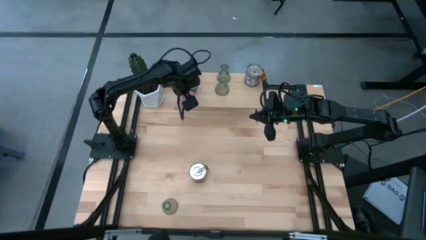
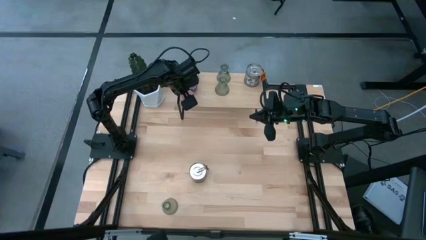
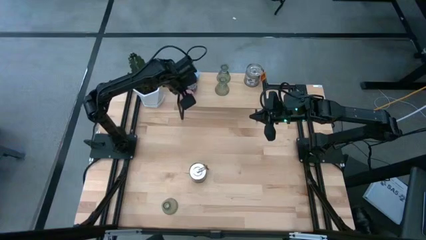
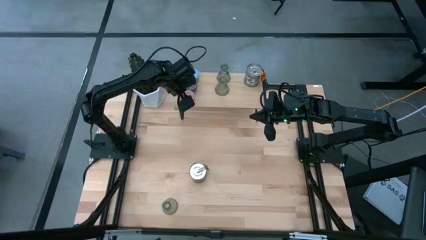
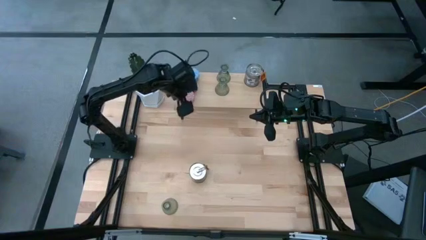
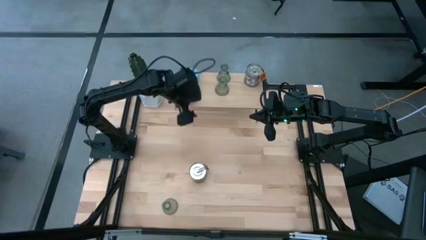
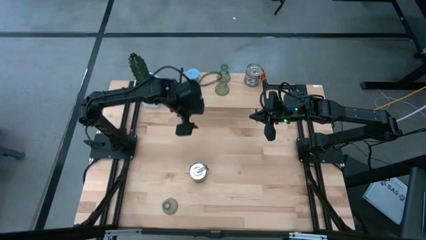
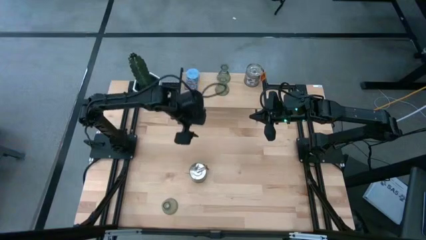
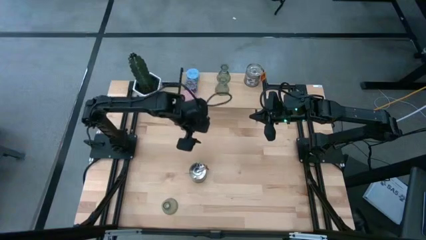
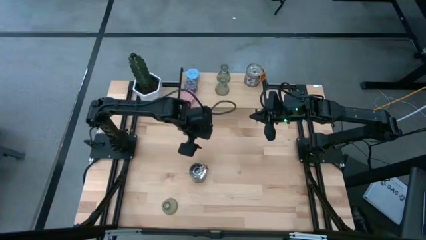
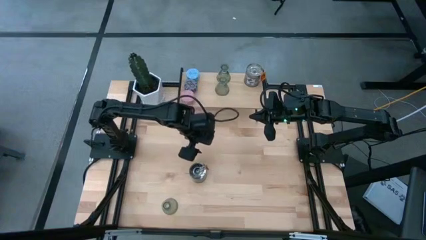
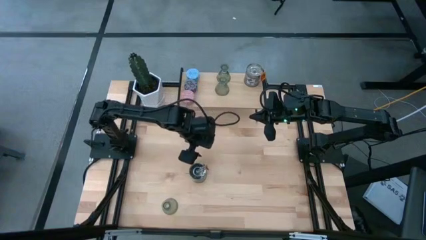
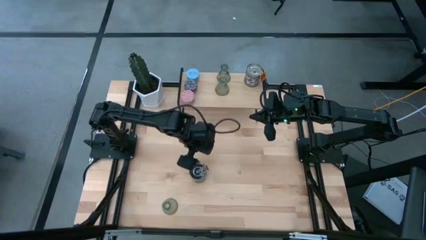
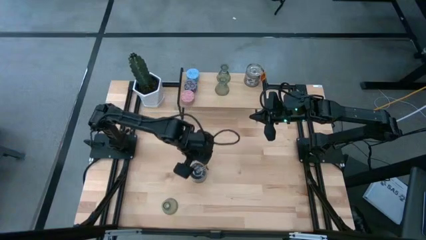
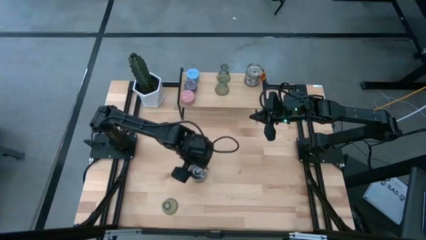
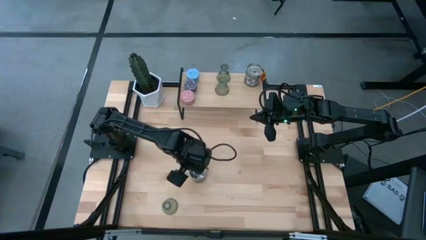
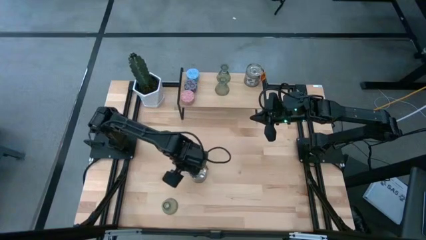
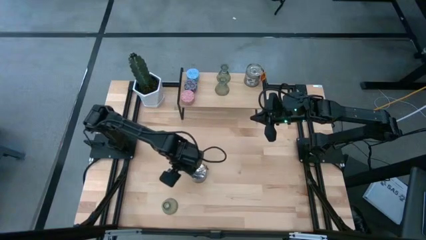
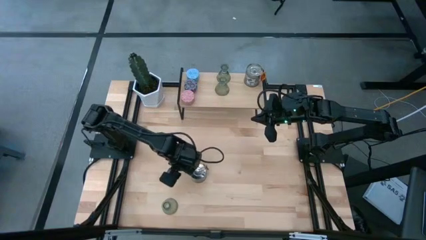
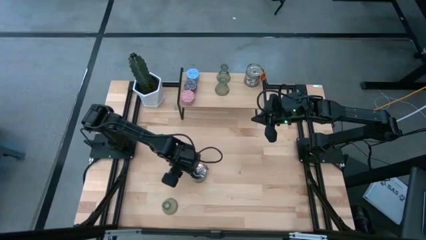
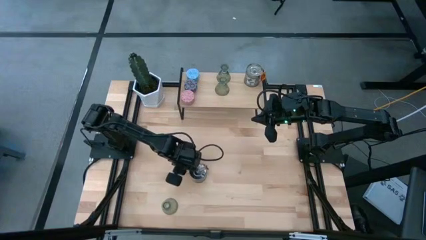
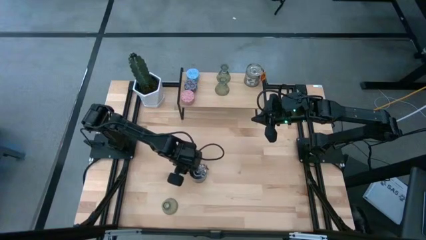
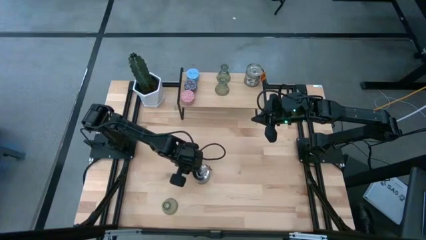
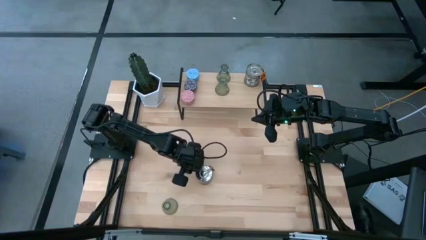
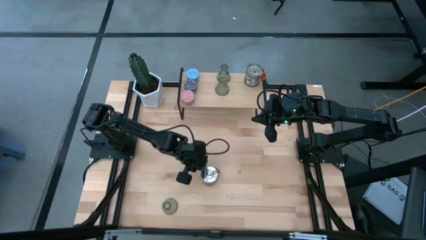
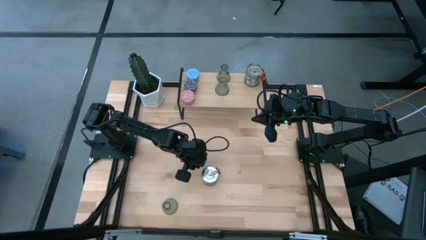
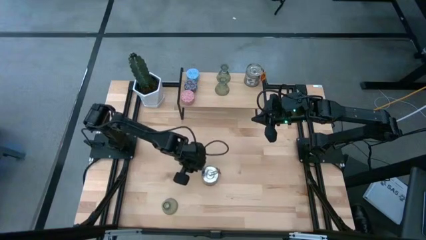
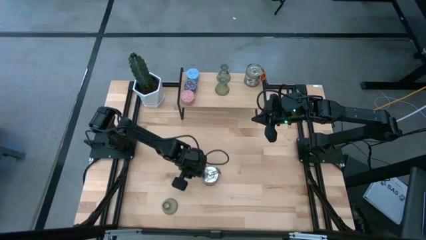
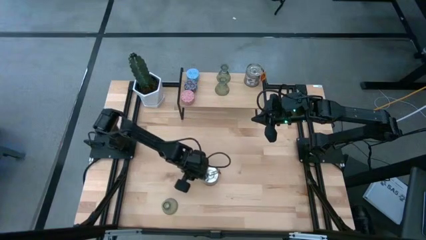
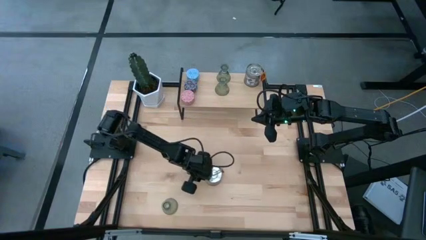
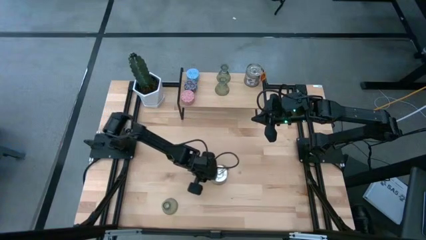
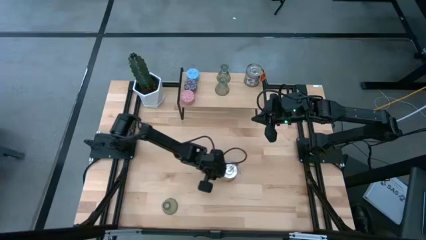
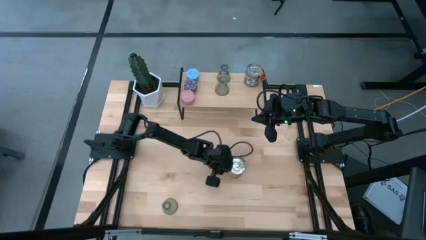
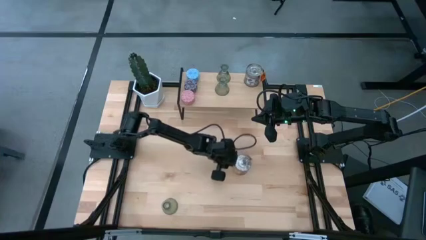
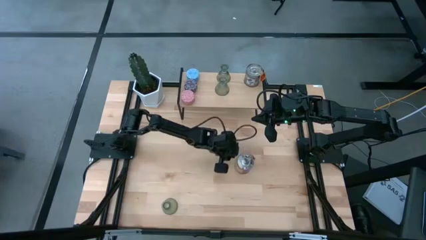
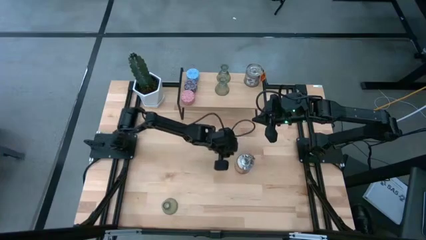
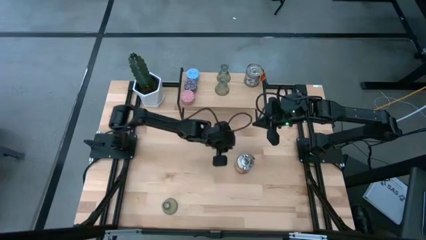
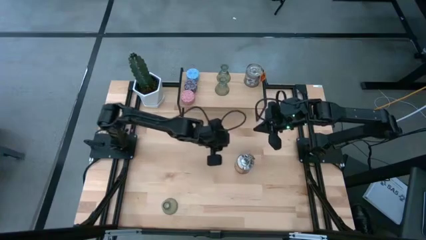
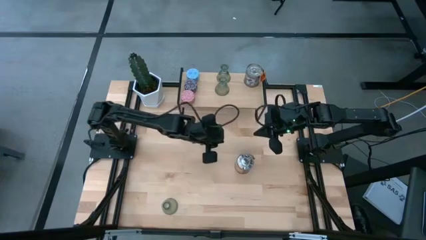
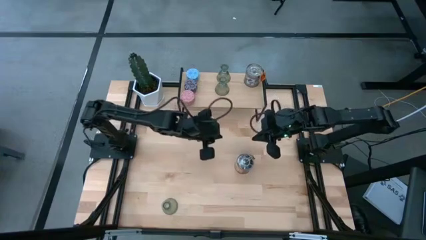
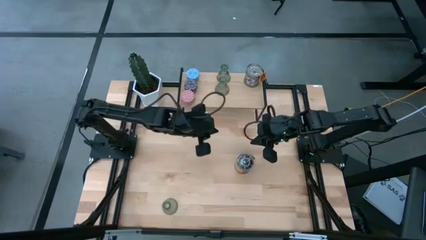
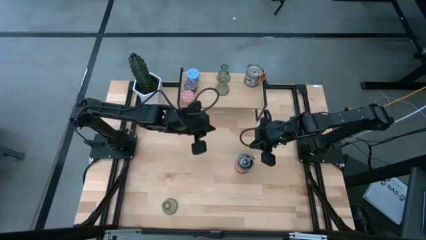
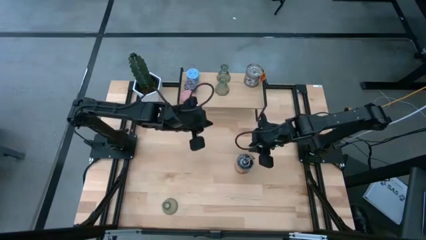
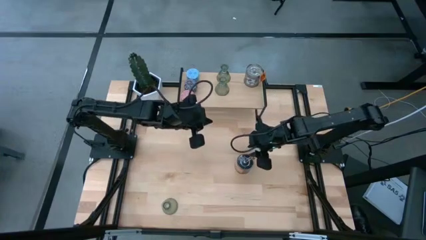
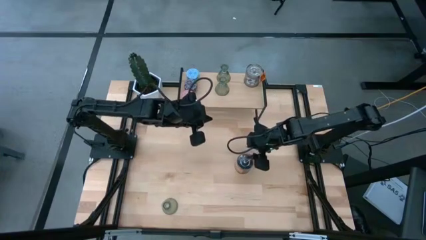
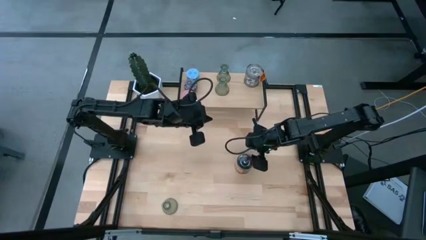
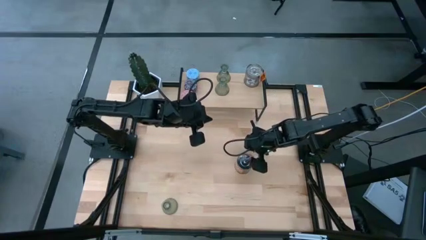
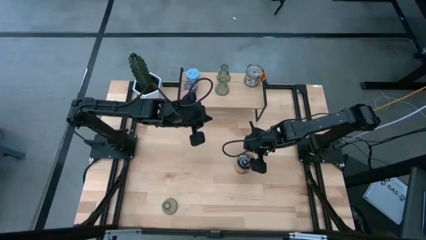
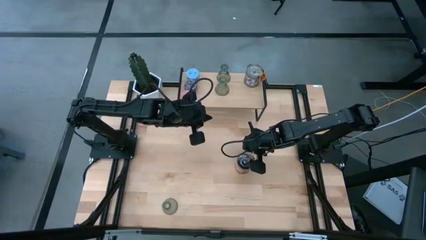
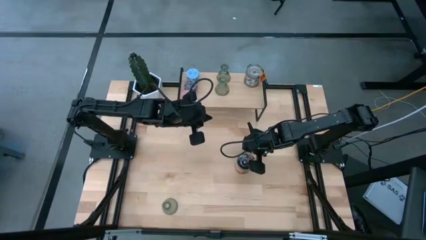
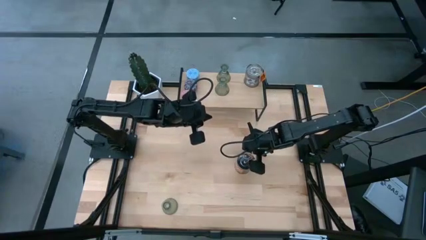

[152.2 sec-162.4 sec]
Task: Pick & Place candle stick holders
Put the silver scented candle aligned with the silver scented candle on the shelf
